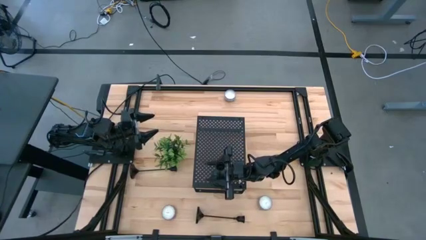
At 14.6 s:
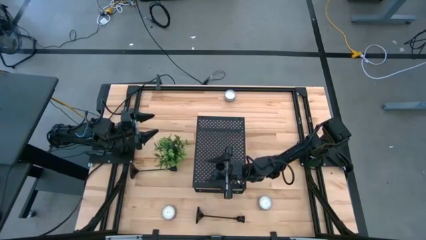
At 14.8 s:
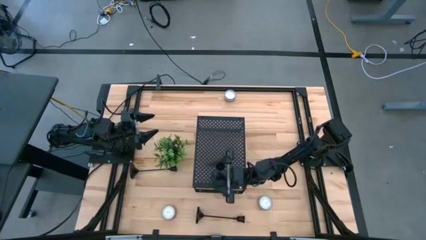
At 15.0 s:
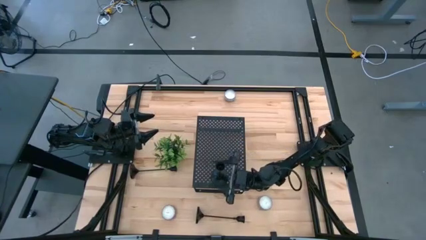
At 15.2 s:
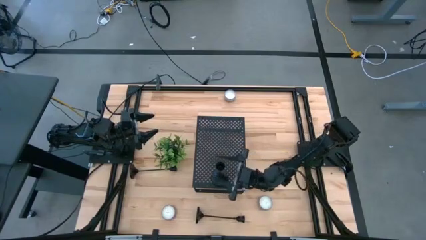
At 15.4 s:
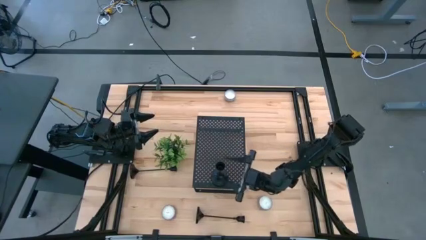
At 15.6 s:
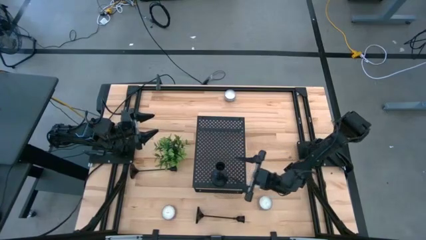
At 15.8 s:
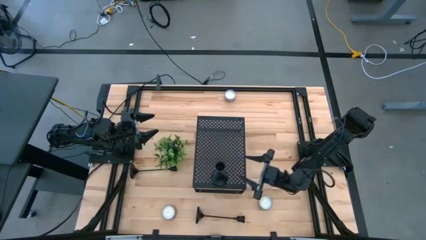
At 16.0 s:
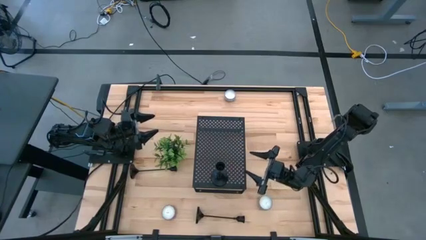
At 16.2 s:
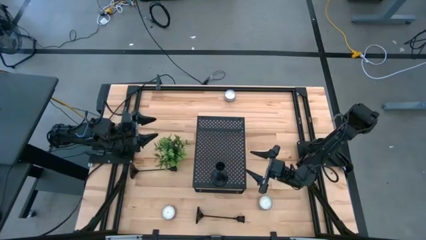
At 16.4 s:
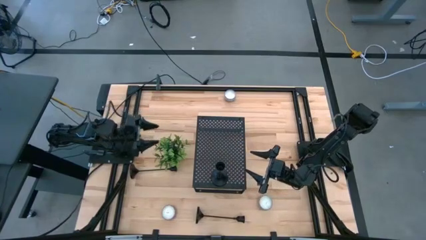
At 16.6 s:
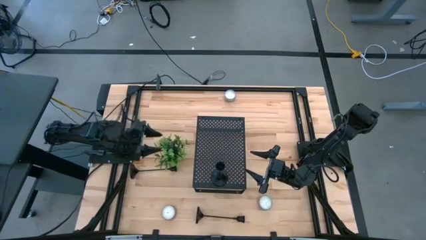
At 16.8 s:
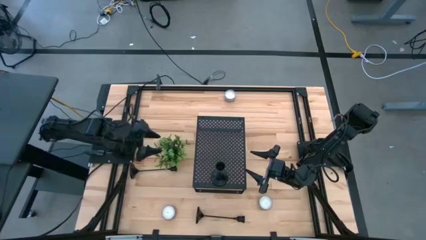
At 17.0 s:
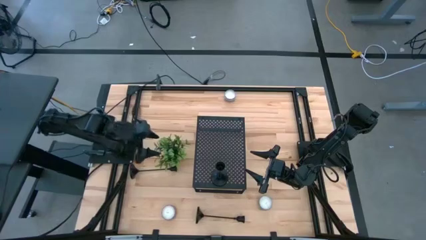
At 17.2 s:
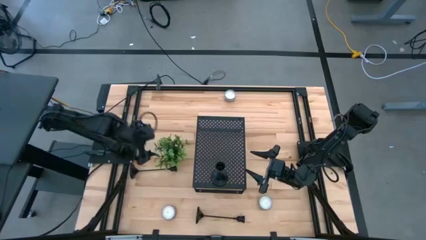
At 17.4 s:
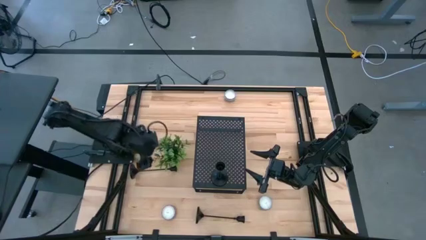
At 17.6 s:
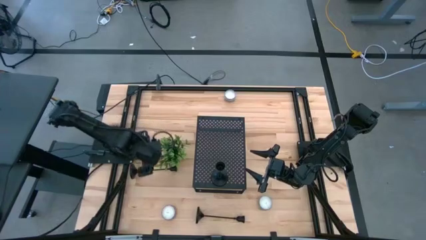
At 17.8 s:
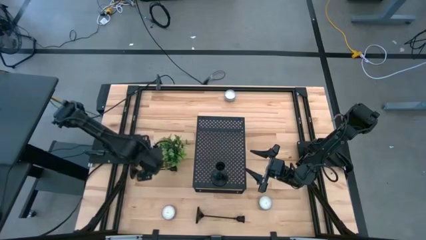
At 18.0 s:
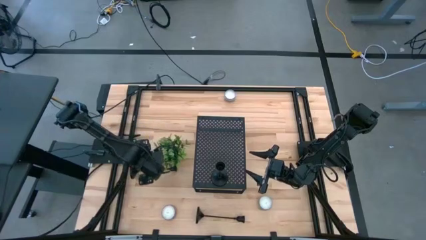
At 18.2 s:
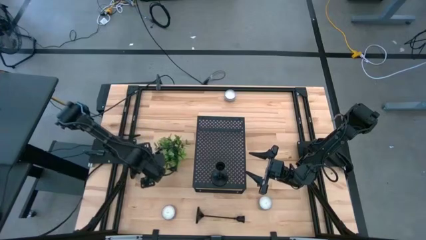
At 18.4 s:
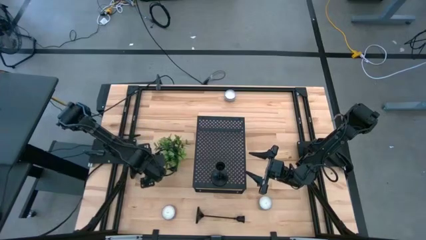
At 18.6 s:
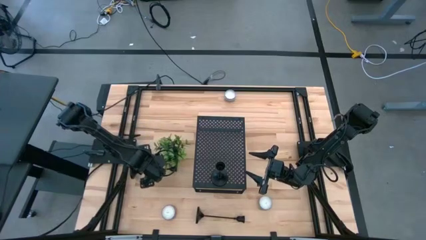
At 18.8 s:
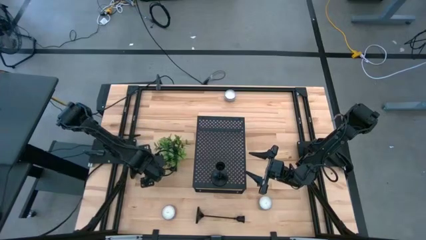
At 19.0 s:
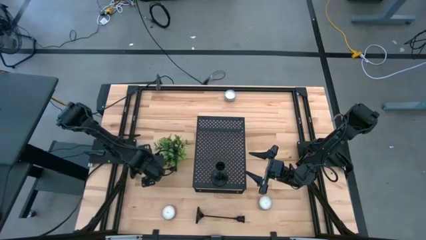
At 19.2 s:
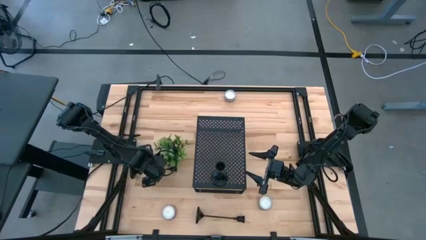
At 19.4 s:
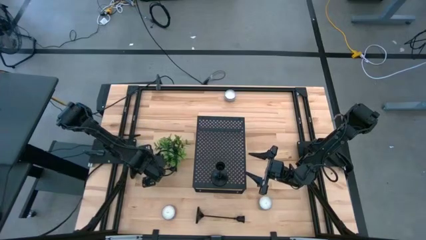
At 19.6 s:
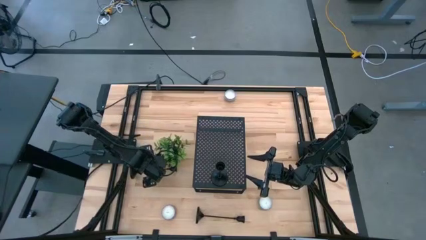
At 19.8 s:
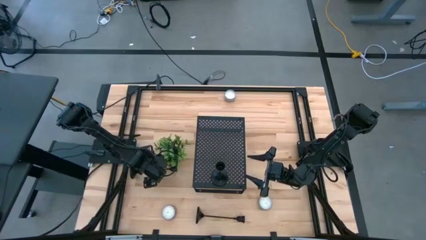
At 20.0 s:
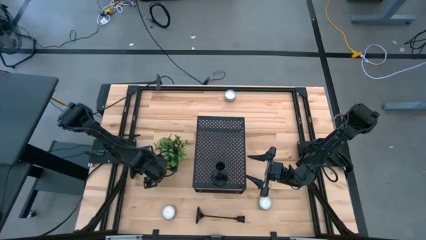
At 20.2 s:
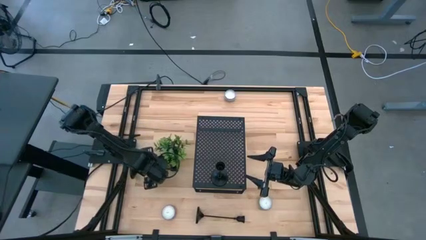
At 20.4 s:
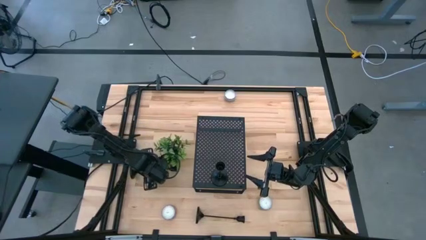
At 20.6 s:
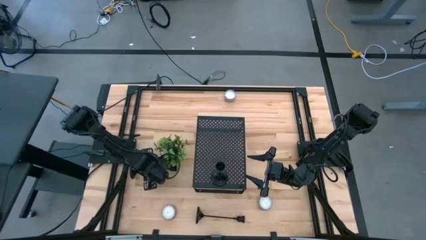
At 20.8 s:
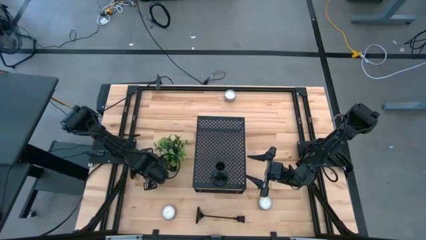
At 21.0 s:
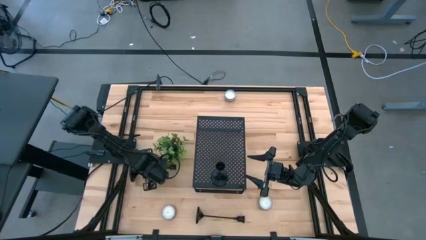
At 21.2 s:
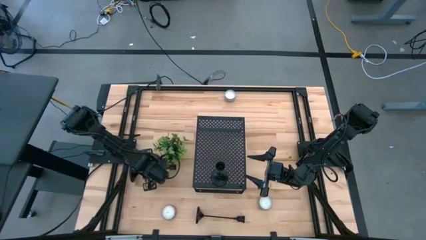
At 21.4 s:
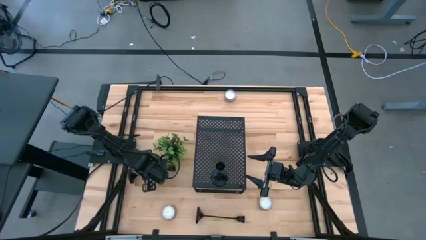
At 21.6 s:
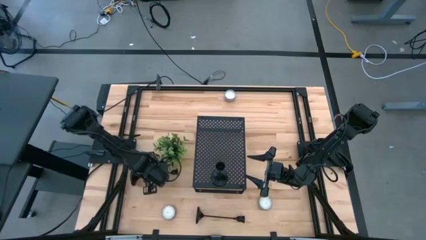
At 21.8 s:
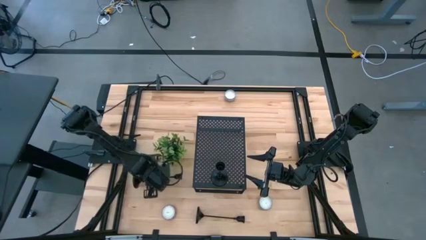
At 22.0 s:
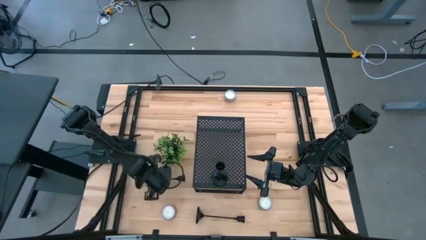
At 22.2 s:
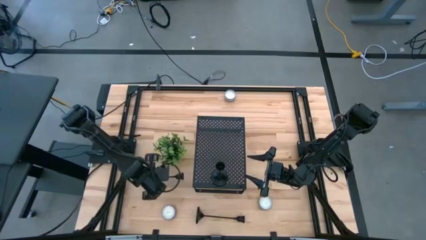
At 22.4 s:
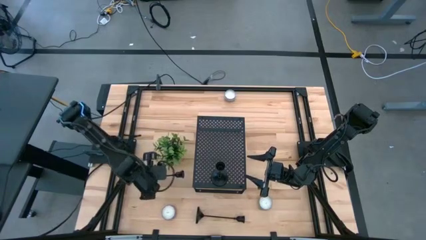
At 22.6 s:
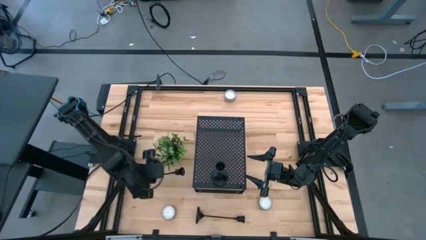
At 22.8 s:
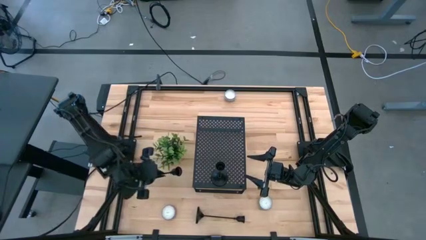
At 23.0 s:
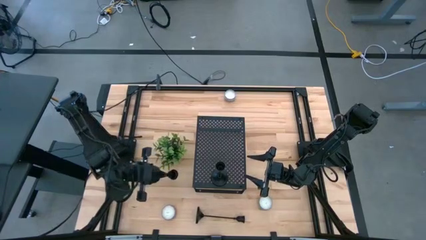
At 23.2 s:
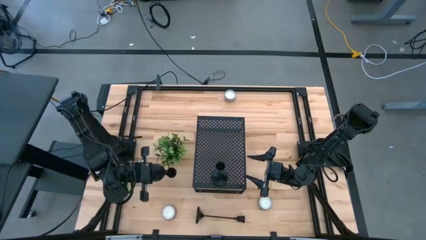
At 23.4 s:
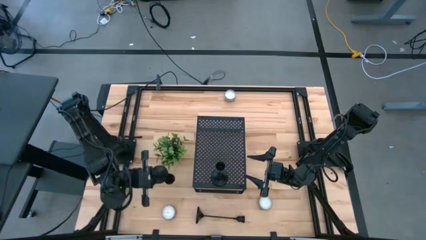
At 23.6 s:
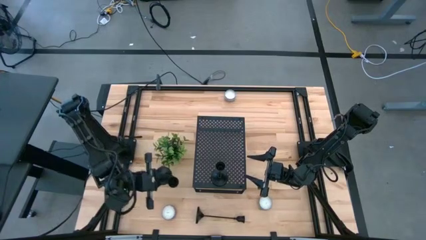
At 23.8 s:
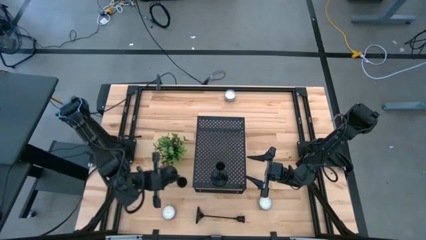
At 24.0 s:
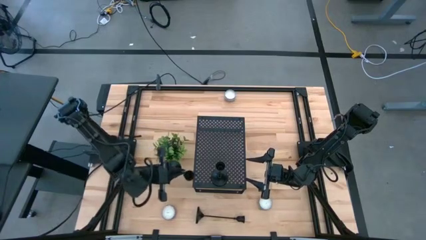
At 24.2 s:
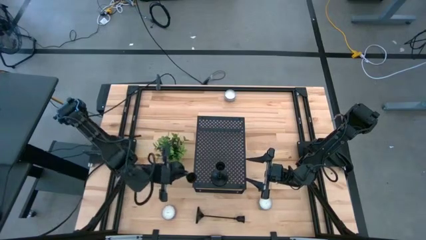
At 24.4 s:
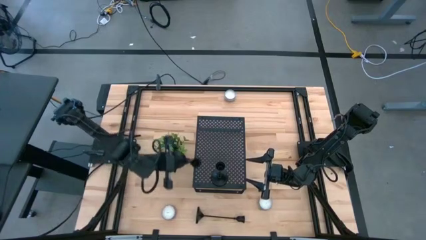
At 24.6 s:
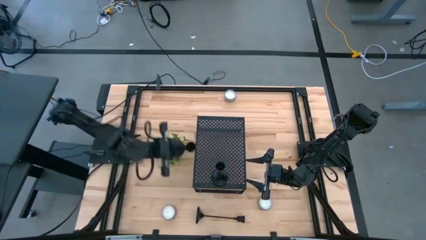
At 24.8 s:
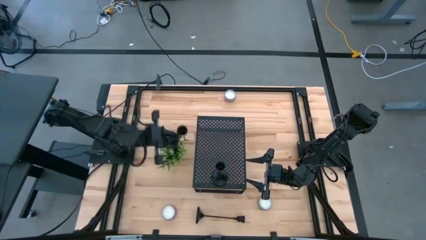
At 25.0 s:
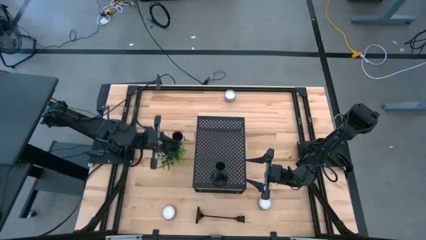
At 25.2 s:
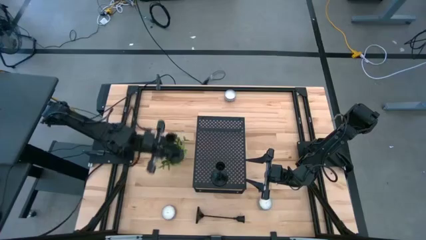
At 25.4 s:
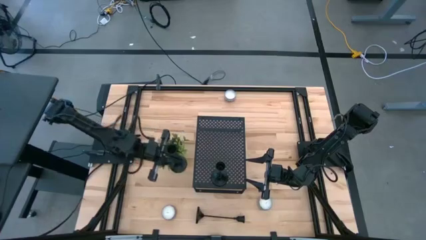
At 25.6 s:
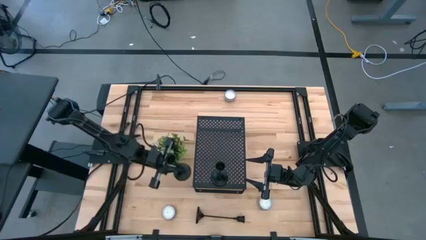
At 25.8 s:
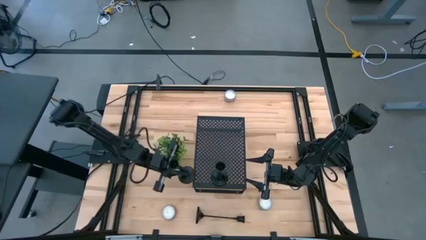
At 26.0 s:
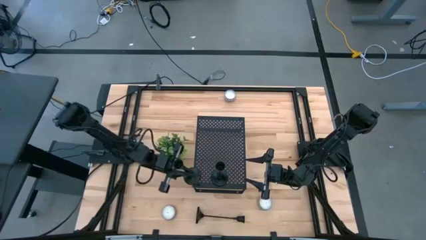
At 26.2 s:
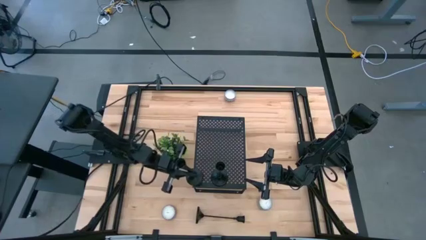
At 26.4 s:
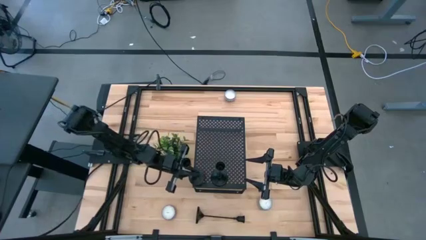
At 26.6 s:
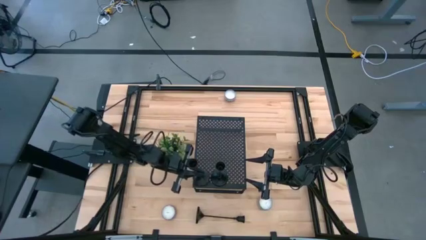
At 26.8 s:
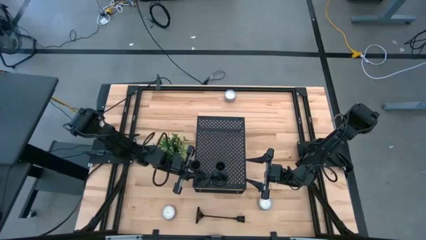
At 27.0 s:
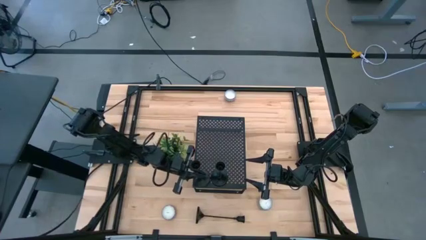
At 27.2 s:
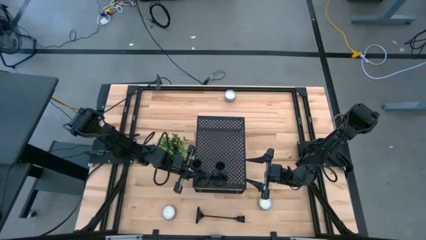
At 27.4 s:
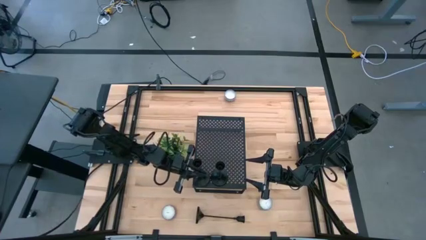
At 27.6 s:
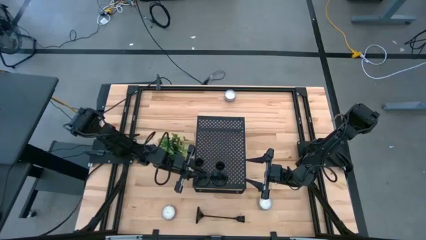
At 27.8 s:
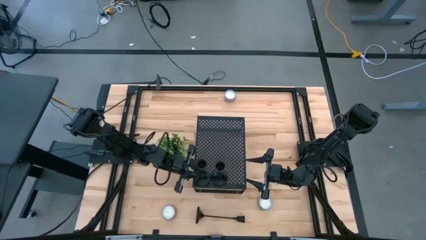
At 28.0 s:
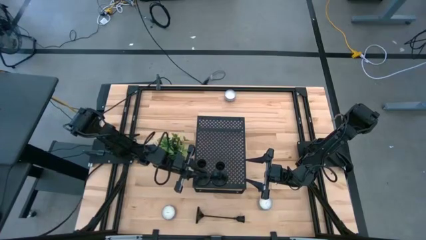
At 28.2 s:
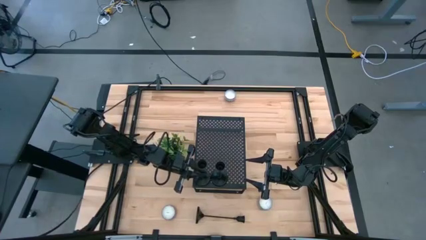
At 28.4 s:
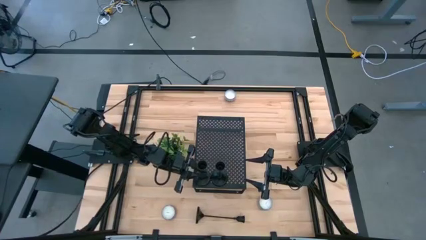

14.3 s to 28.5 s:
Task: Pick & Place candle stick holders
Put the top black candlestick on the shelf

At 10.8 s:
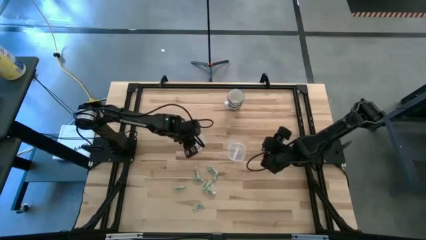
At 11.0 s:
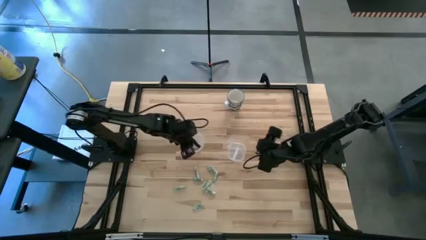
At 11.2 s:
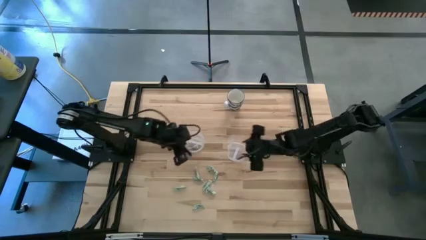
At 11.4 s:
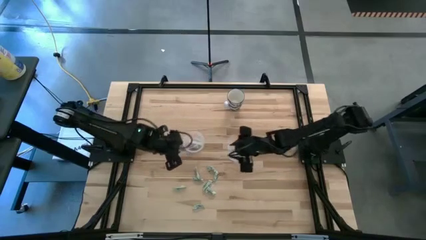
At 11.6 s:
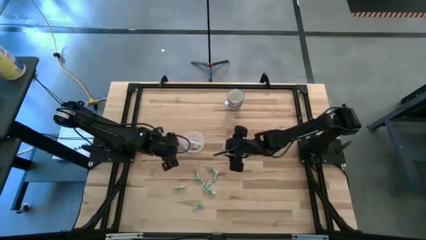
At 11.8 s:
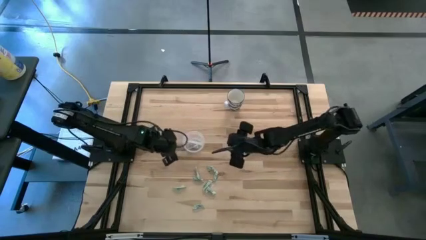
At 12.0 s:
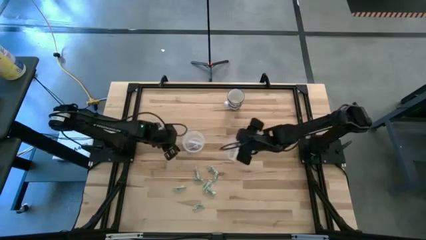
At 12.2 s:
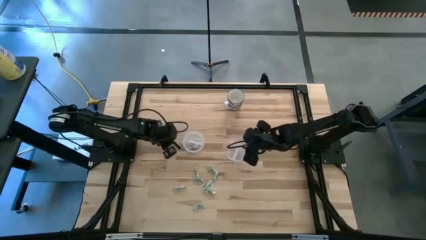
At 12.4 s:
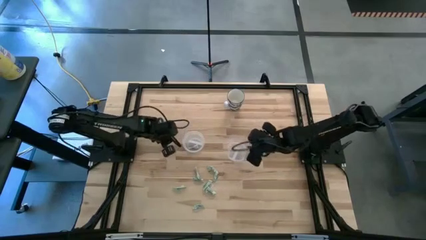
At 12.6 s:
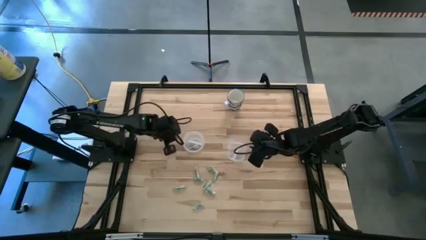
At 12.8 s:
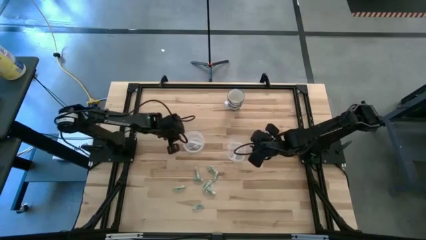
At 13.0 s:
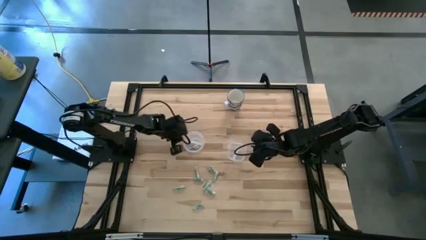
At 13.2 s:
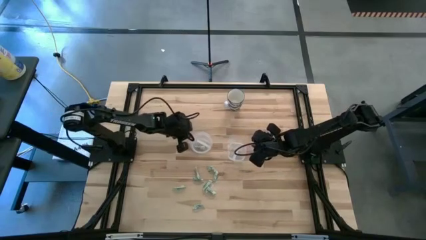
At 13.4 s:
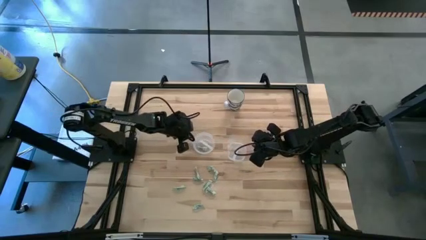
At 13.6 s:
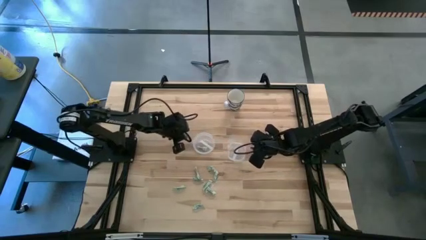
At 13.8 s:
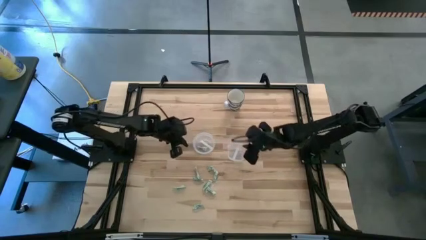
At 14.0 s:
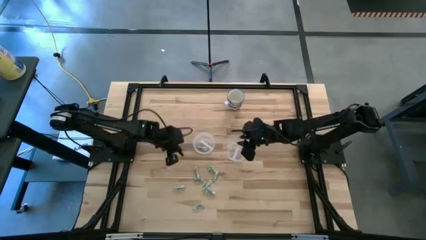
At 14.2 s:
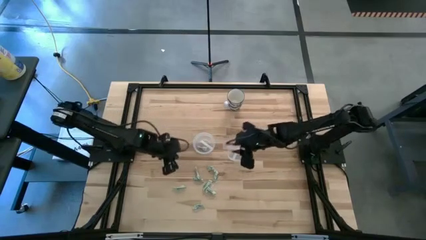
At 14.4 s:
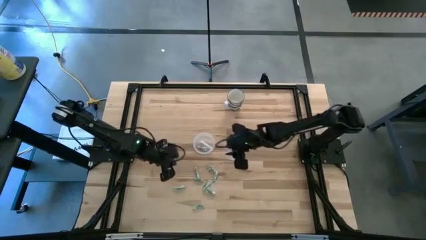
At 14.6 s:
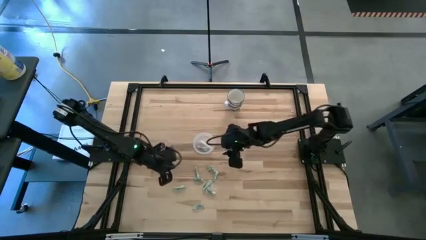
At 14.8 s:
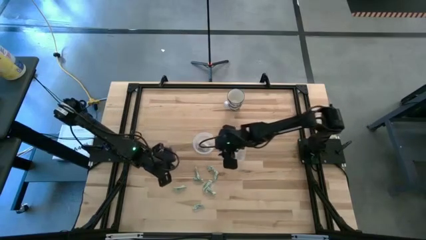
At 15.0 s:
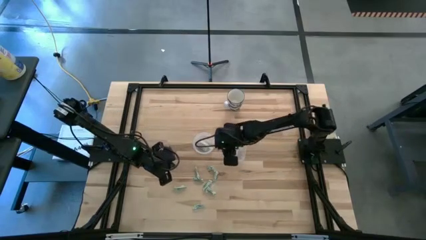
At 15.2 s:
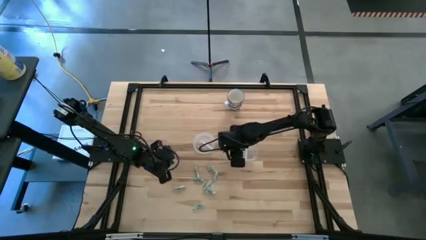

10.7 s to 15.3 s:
Task: Pick and place Stevia / Truvia into bins
Adjust the transparent containers
